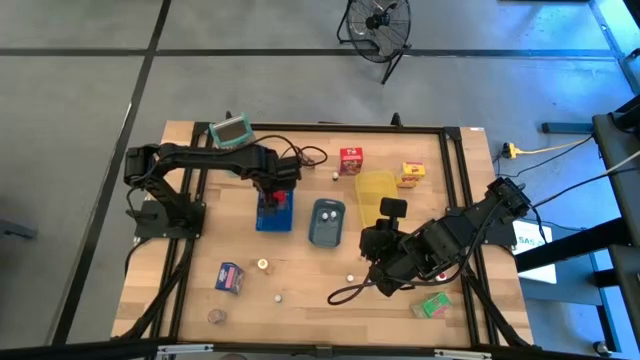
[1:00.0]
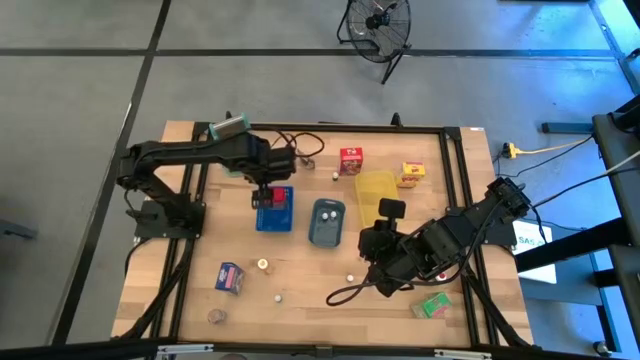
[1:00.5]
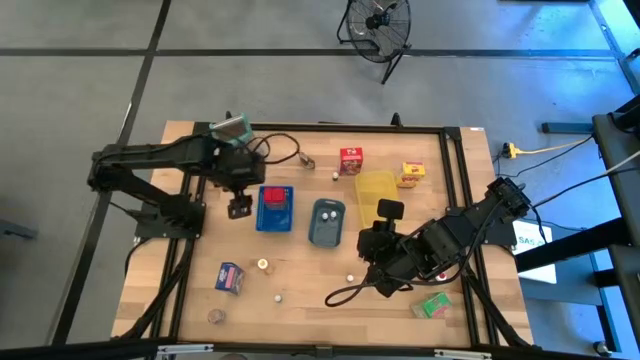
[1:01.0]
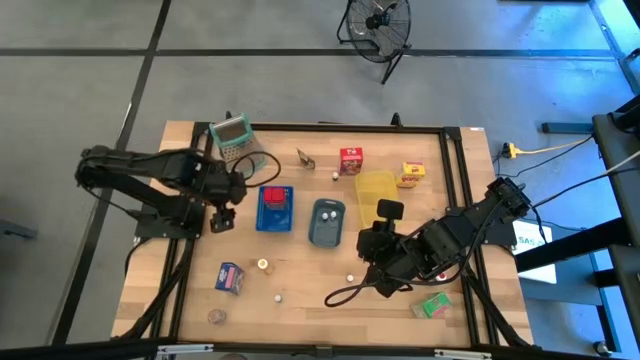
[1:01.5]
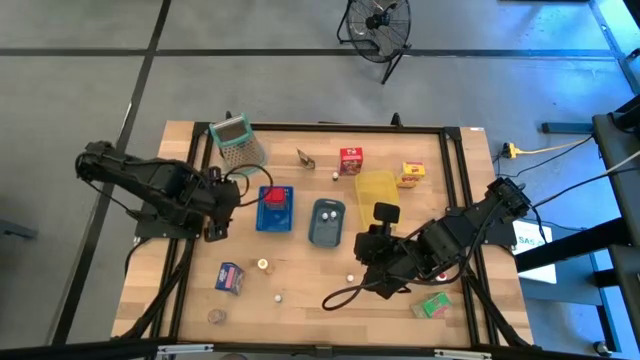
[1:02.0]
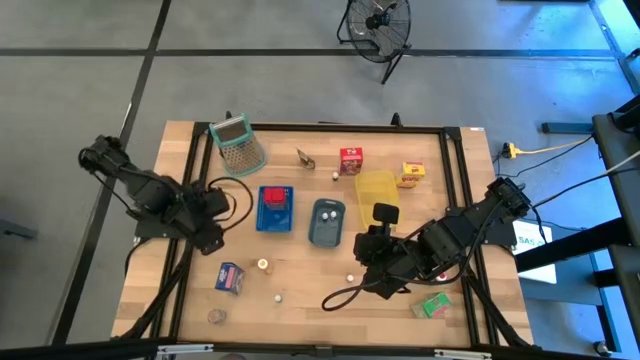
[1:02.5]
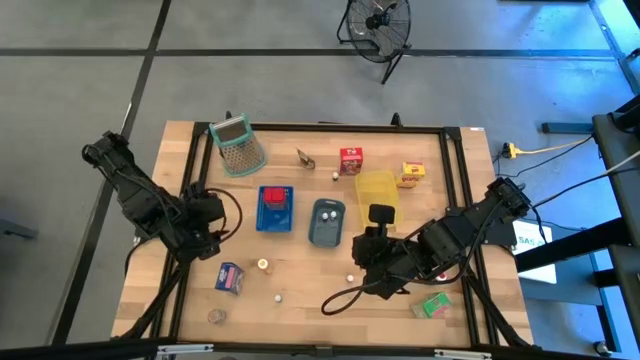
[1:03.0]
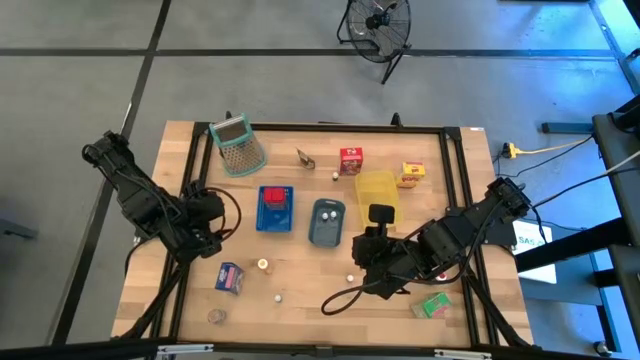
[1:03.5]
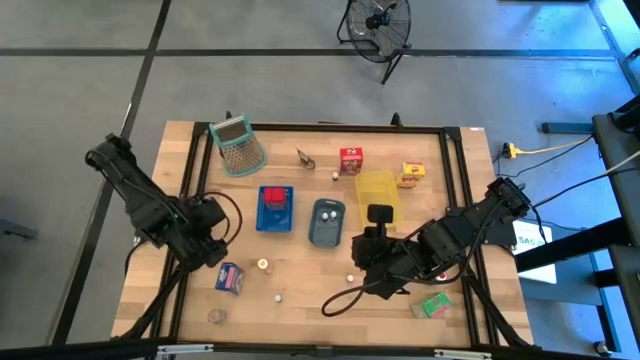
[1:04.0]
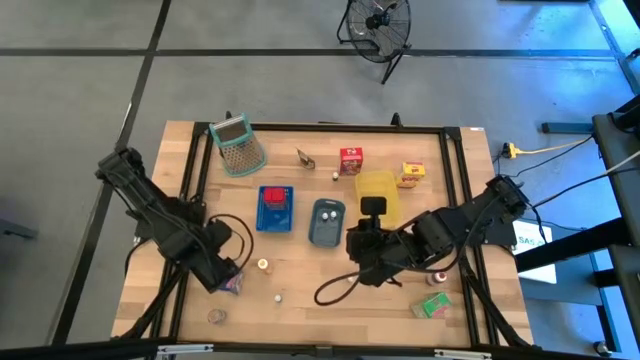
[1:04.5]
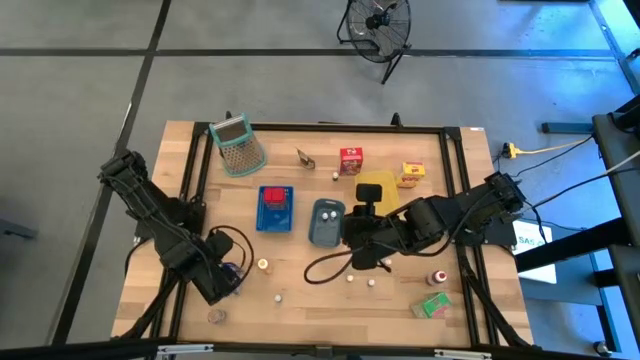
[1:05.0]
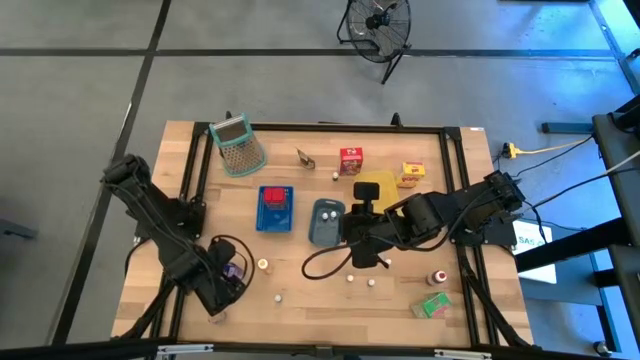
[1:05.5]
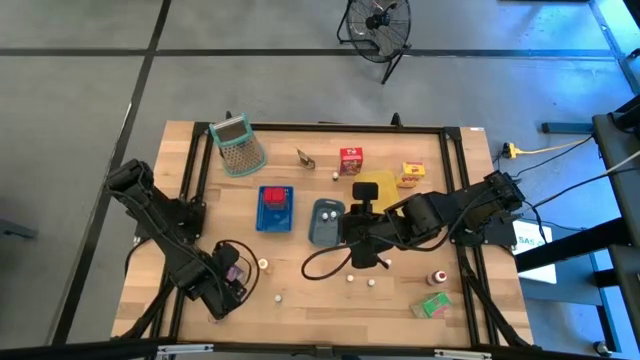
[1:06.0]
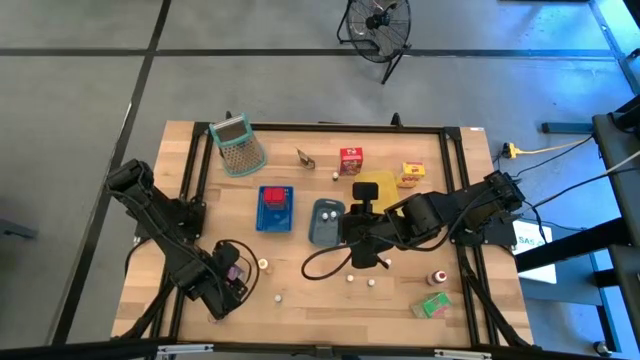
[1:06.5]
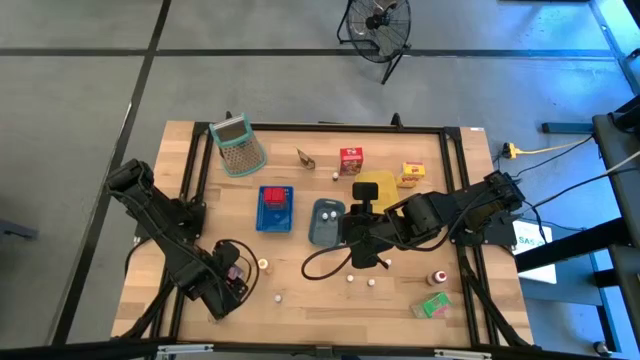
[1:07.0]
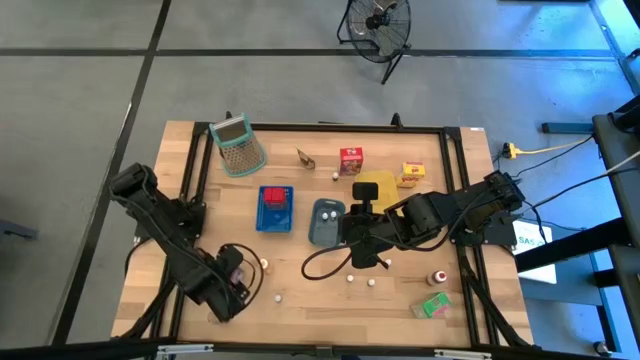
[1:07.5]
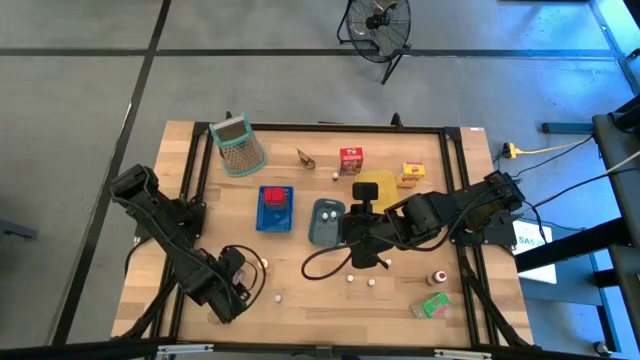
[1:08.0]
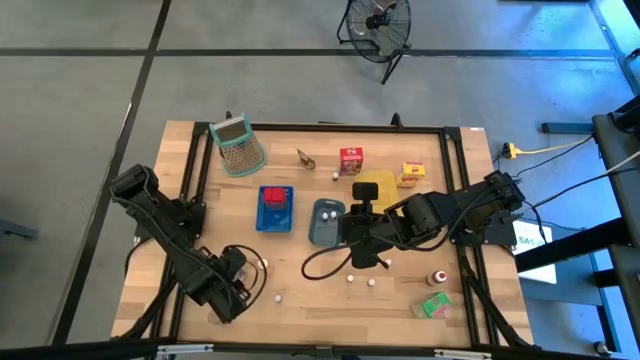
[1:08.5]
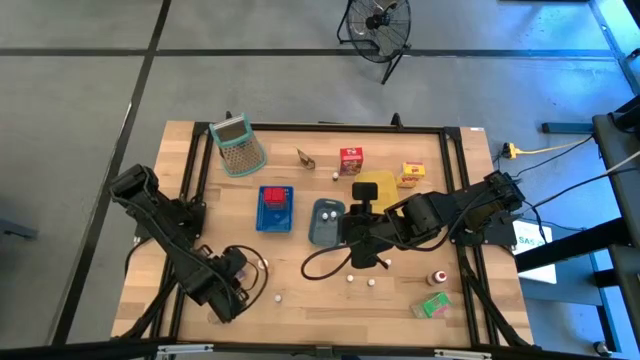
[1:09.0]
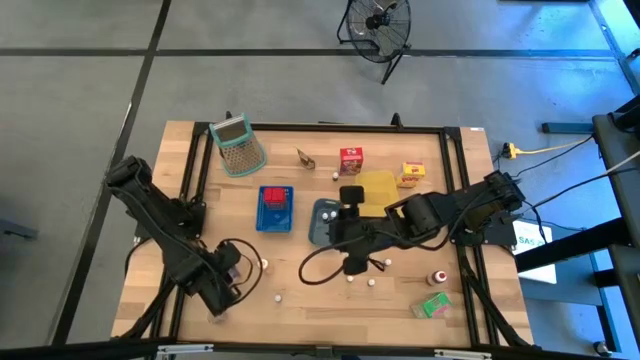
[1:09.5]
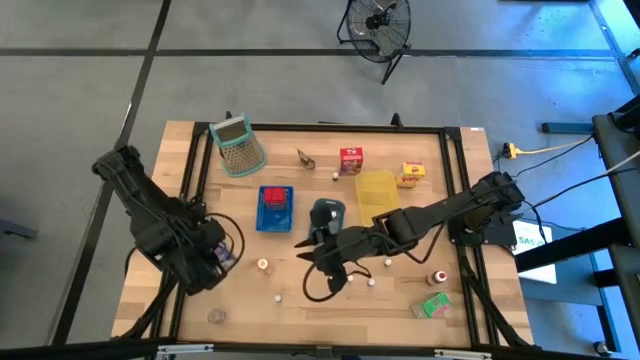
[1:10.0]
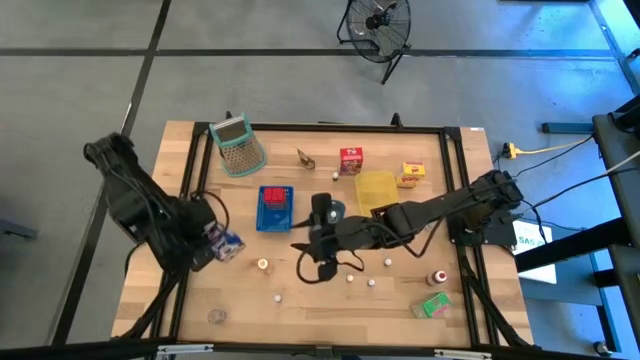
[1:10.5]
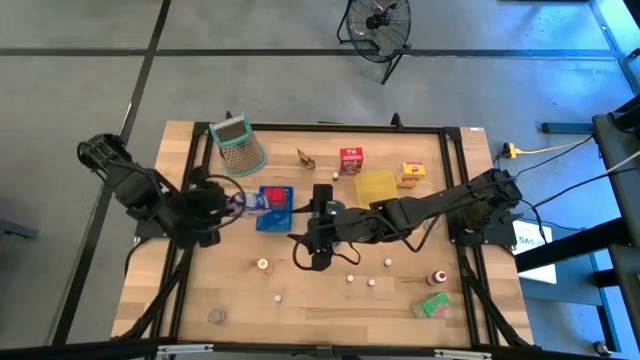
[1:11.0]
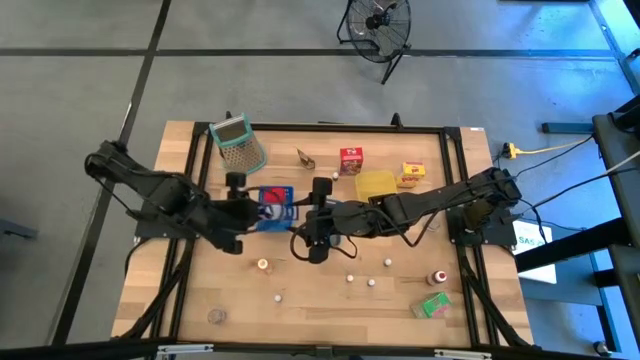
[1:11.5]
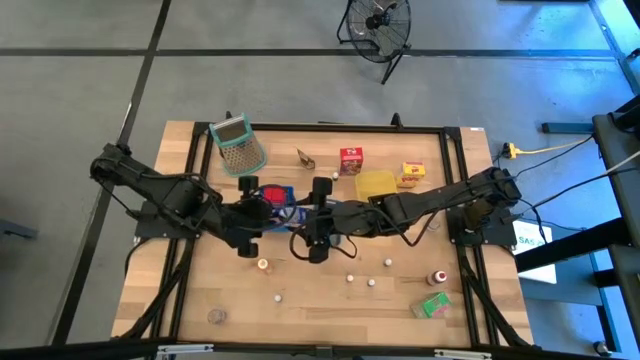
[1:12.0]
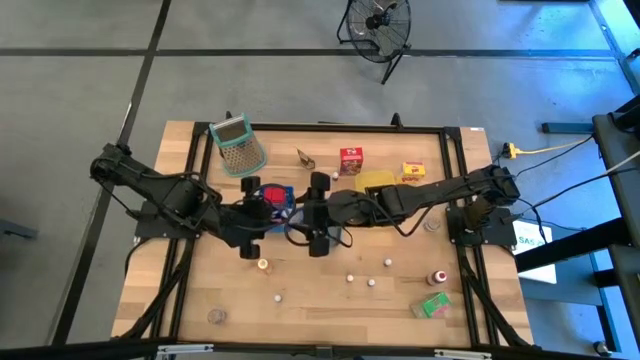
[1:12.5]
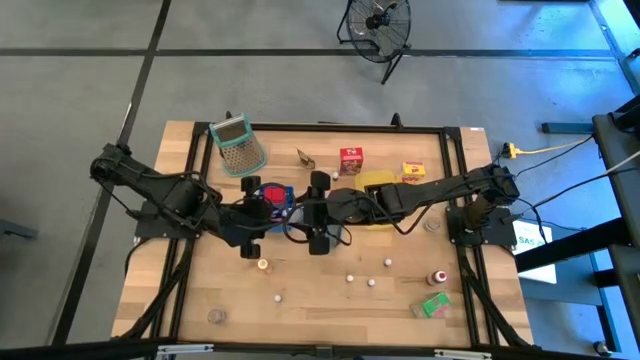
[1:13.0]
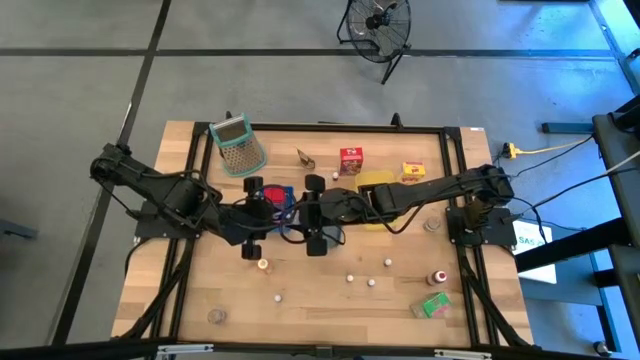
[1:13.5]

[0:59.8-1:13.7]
Task: Pick & Place Kitchen Items
Put the blue cereal box into the yellow bin

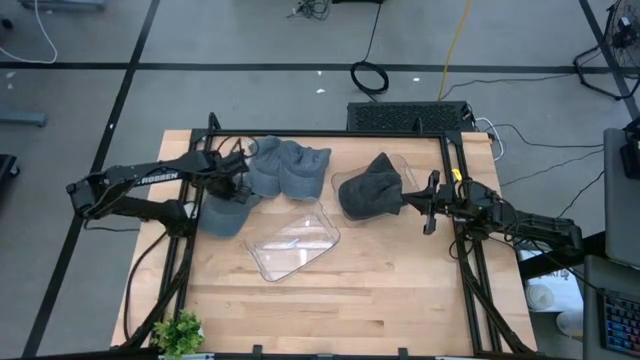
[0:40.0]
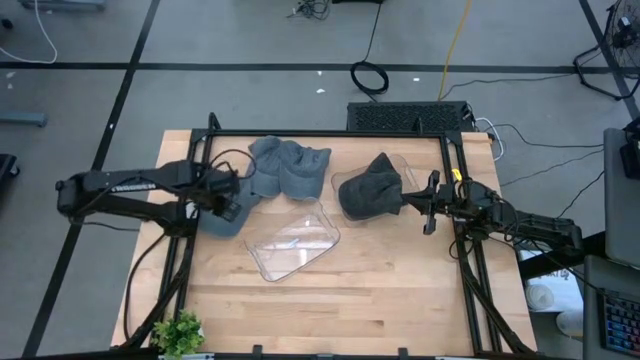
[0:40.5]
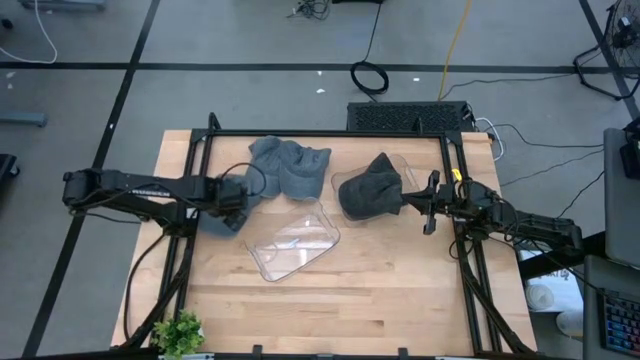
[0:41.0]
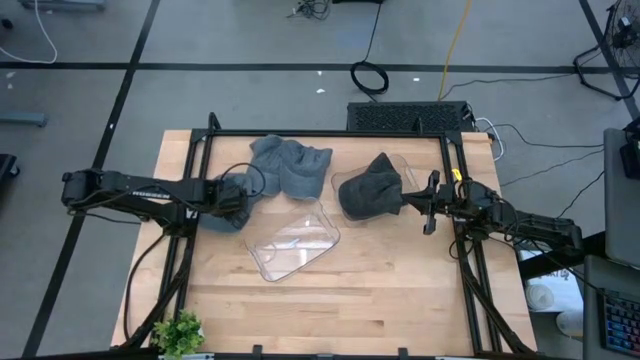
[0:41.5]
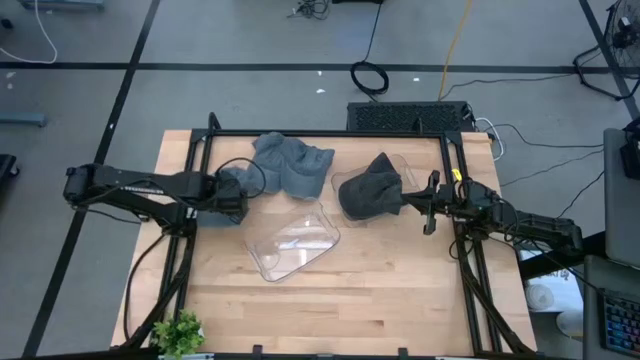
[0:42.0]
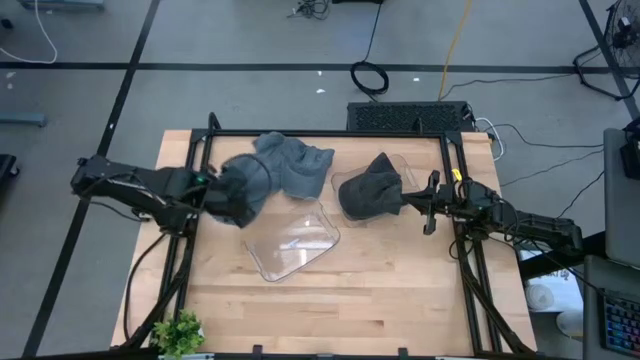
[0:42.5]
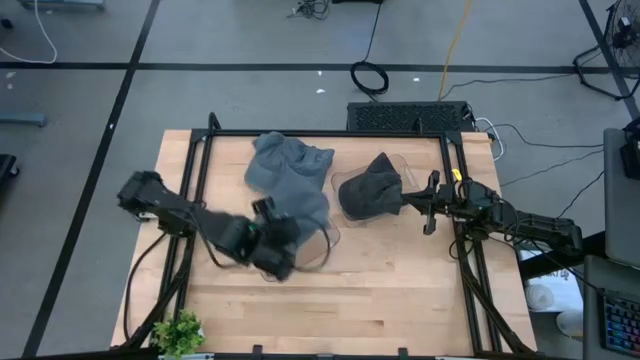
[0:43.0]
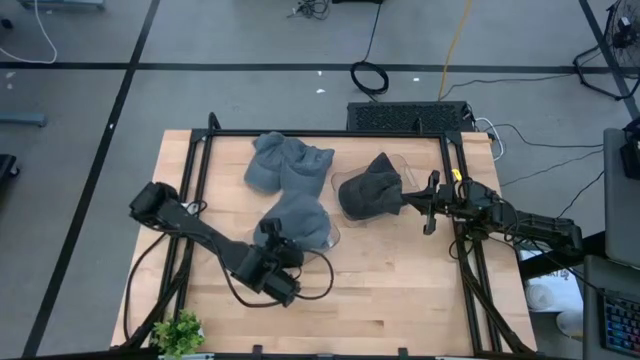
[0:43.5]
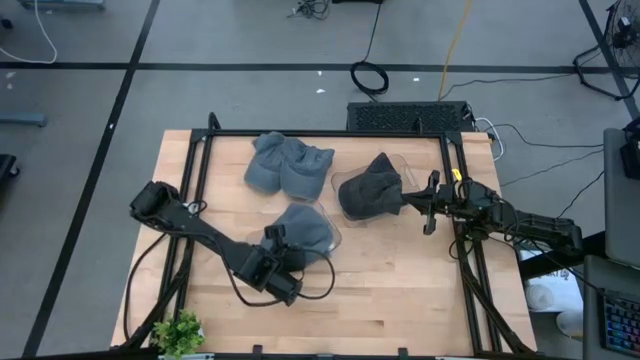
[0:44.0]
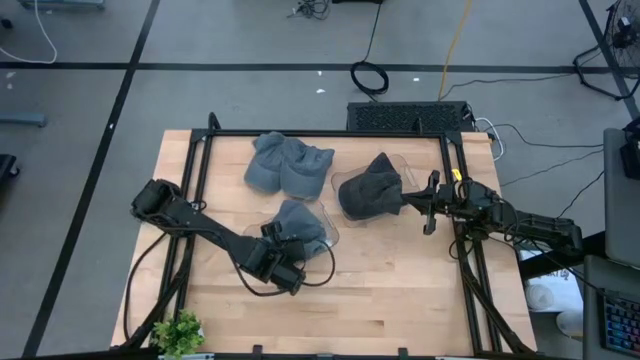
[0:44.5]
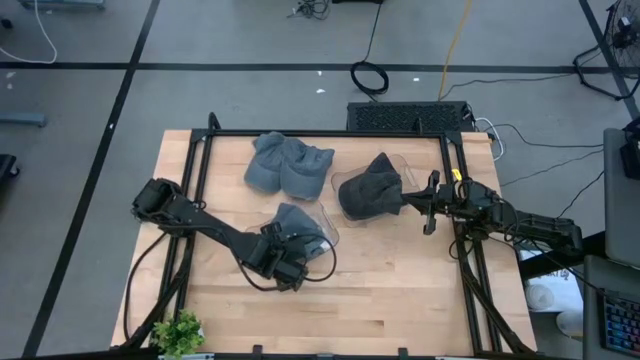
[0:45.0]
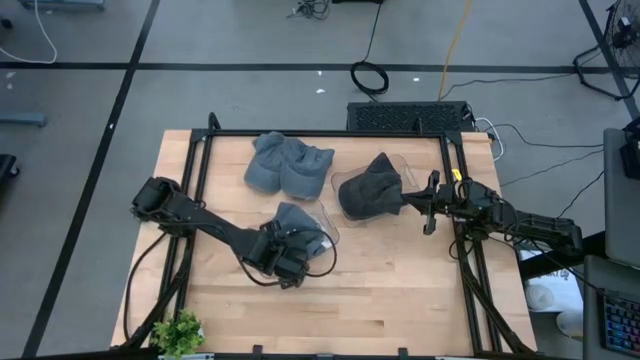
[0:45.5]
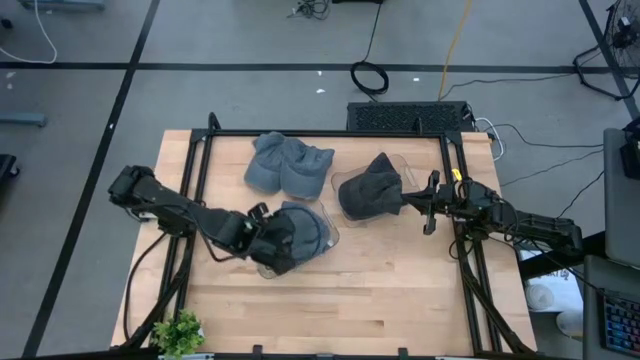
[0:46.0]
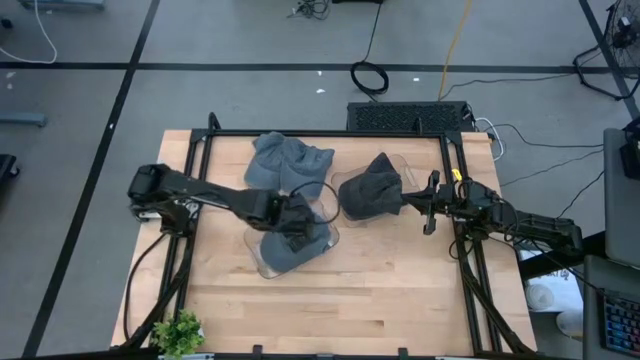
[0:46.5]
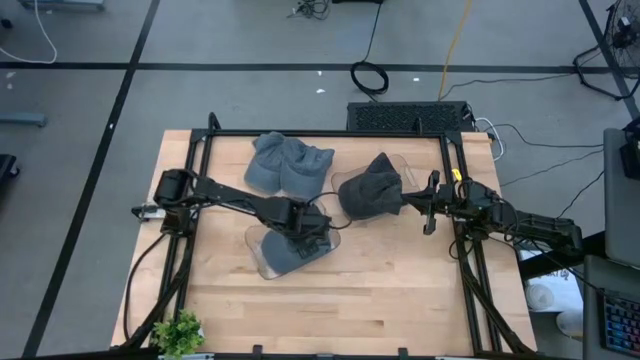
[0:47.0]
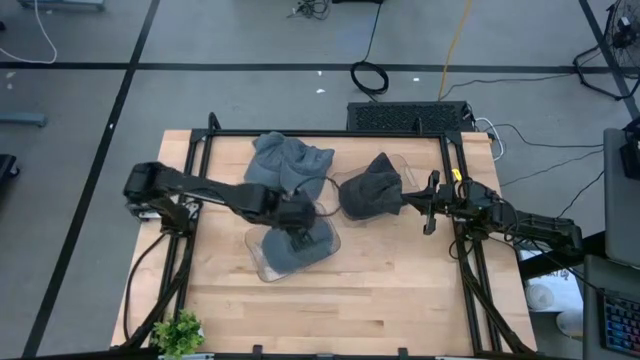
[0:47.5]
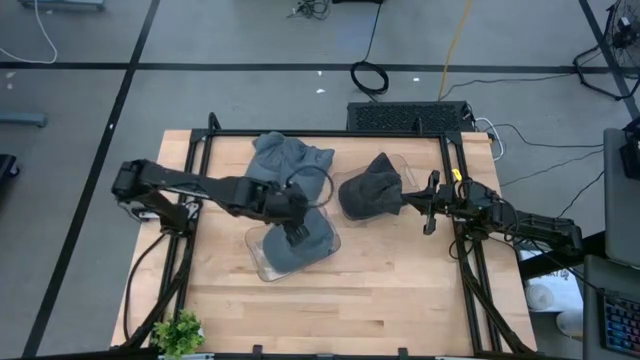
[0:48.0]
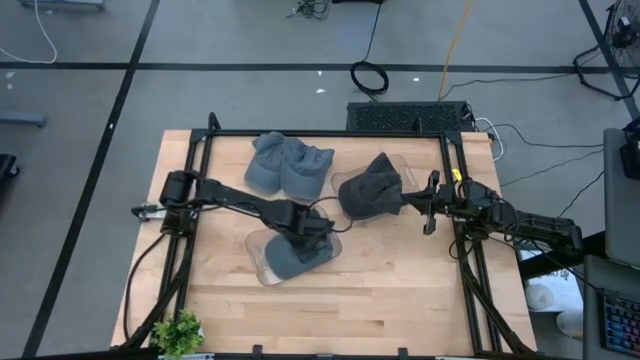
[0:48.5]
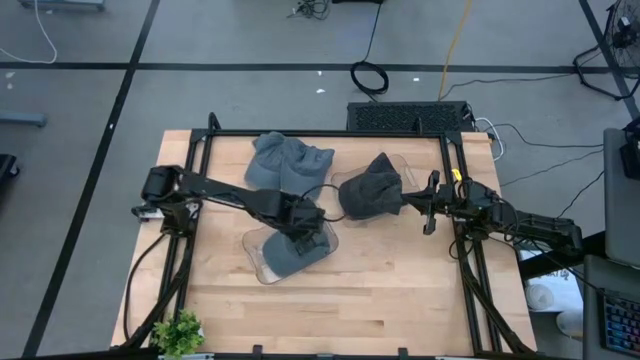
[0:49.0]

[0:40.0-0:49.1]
Task: Pick & Place hat
Put the bottom blue cap into the bottom transparent bin
